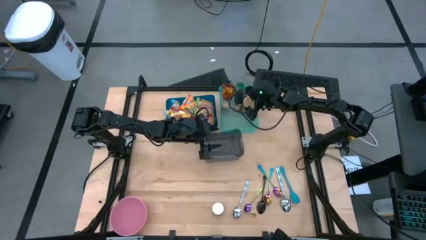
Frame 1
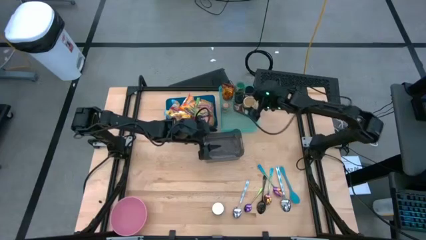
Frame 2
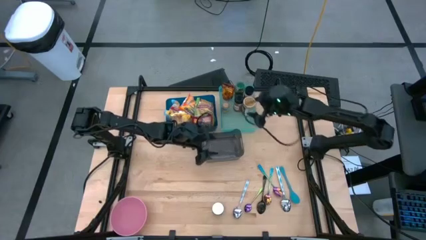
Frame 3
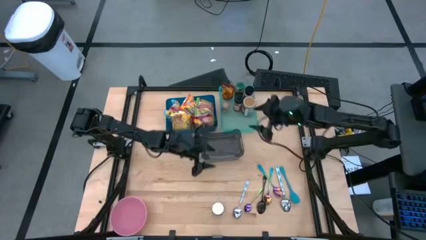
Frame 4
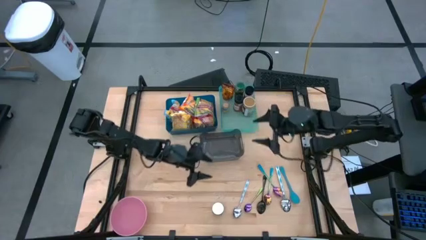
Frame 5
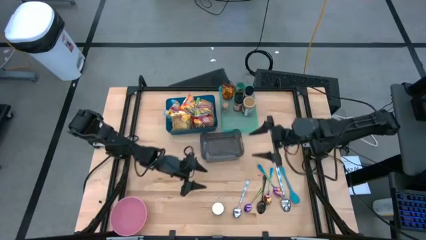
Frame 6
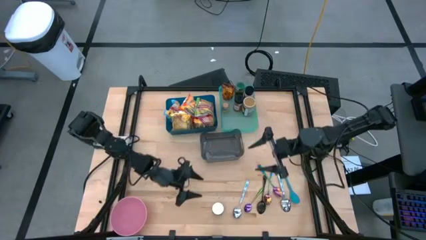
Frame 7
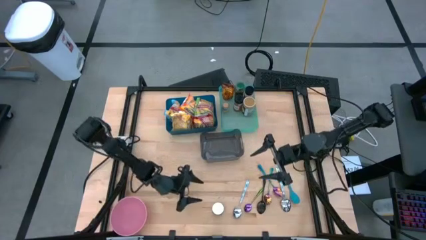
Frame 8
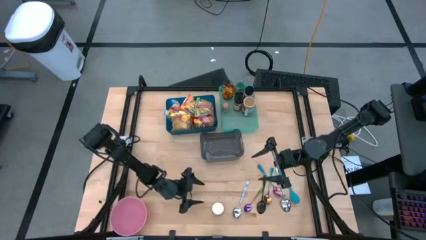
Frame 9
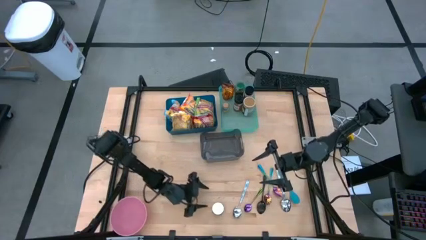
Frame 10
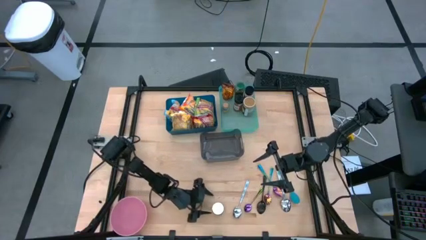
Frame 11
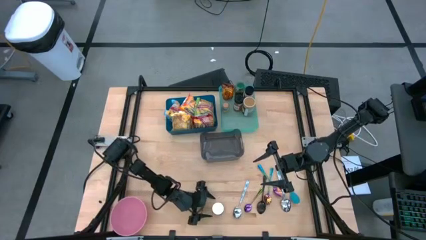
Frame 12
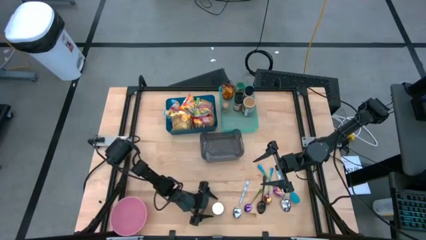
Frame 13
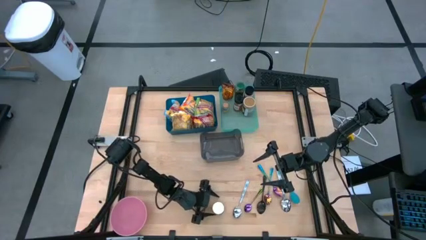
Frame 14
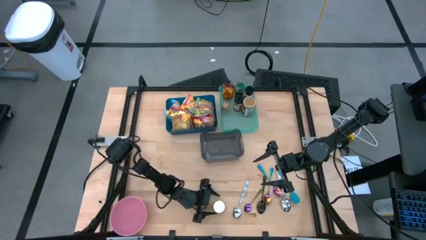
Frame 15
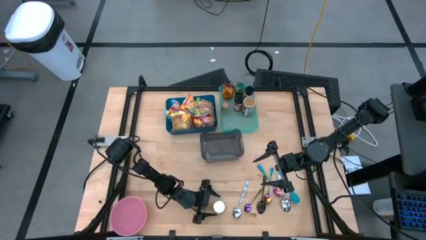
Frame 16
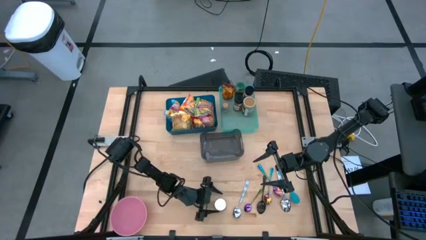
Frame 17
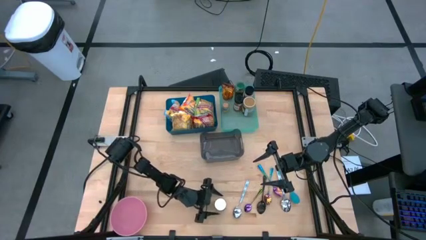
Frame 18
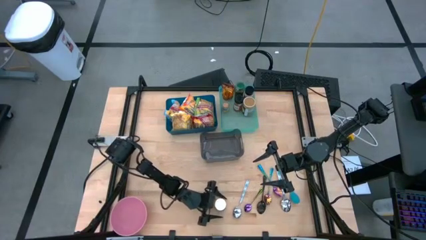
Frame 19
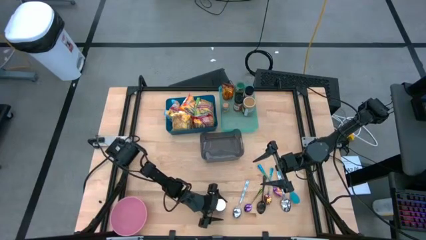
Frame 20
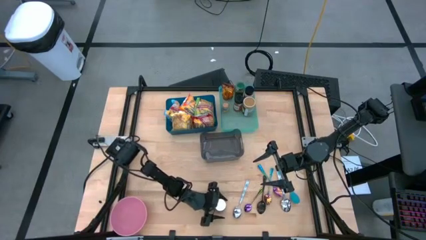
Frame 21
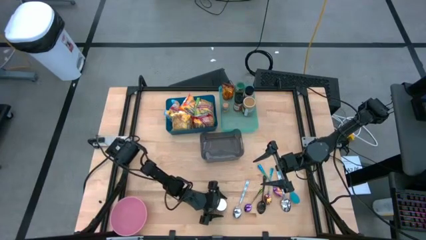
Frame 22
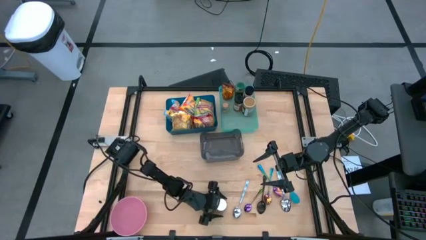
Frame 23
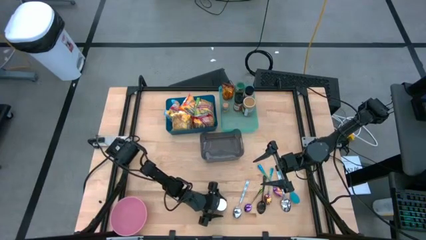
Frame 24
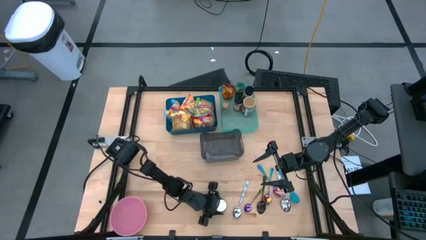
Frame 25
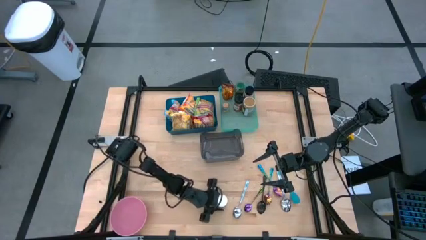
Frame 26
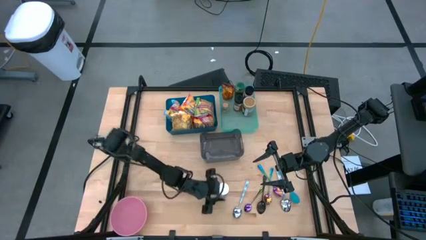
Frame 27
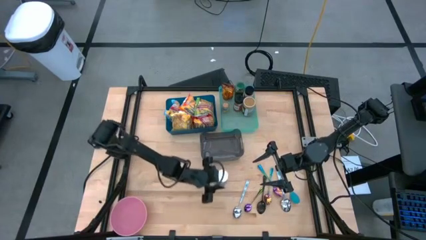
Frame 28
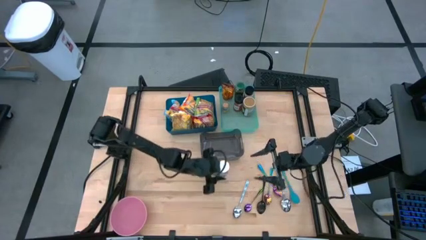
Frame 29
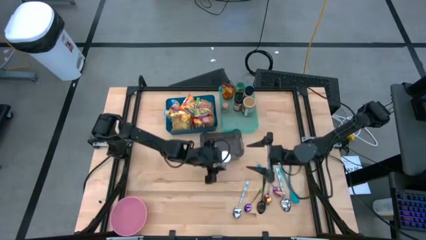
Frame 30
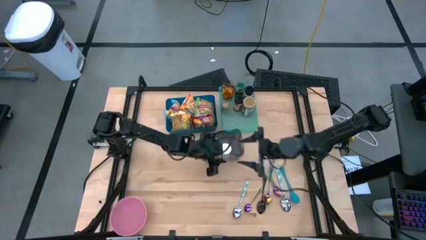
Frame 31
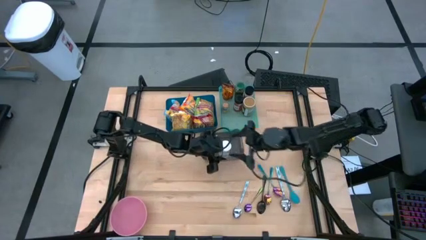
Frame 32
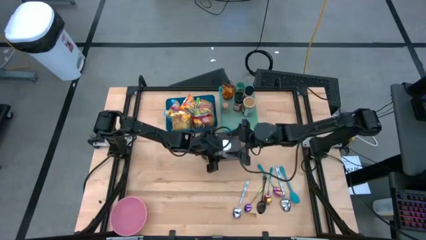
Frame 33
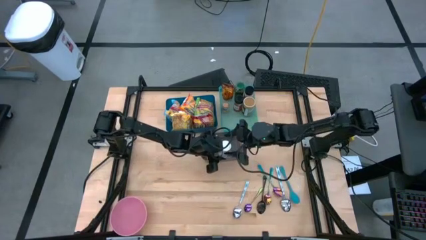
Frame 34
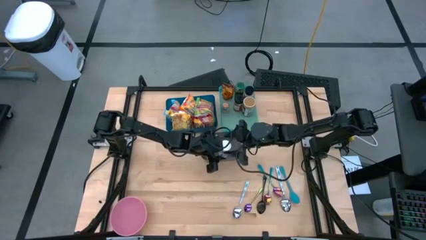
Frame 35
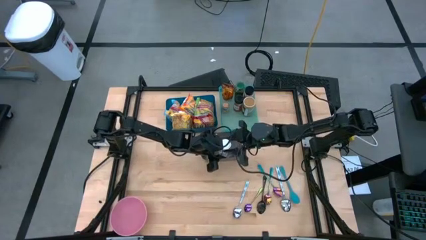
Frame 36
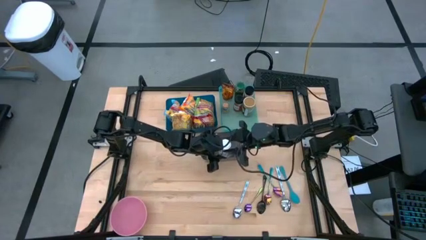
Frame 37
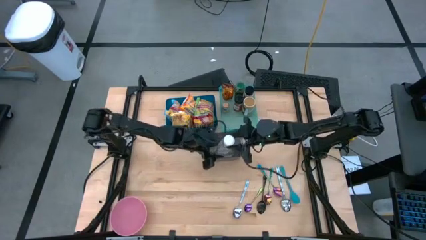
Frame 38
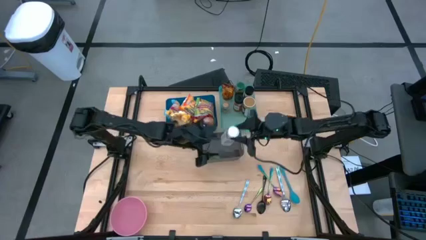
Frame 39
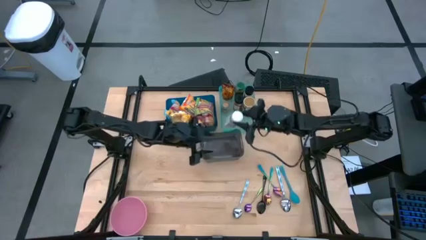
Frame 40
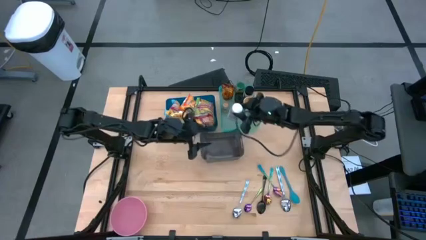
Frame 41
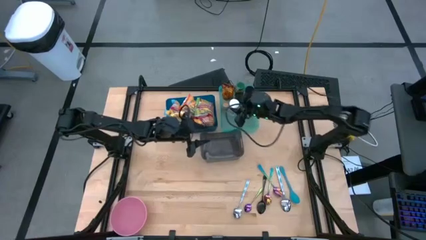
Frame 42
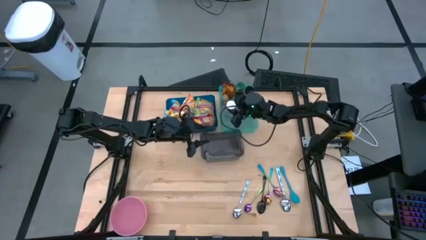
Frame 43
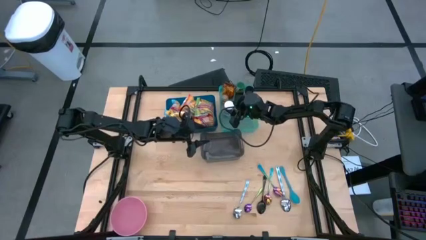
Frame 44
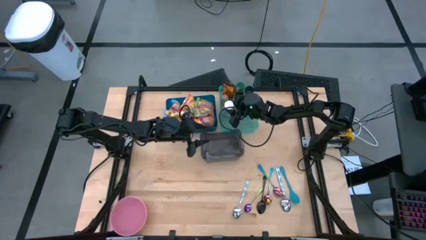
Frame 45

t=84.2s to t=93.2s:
Task: Pick & Place Food Item
Put the white seasoning bottle into the green bin

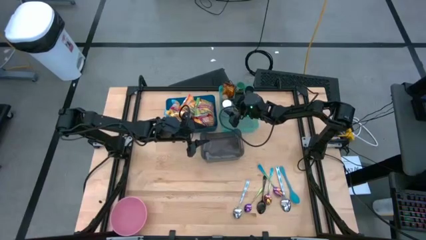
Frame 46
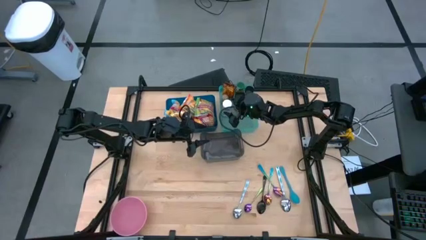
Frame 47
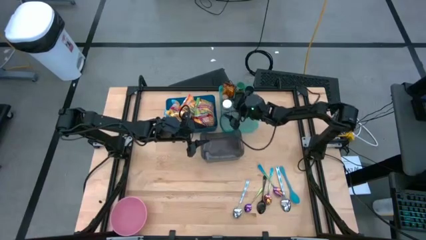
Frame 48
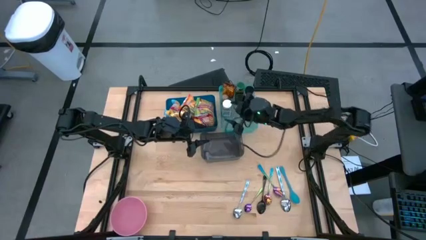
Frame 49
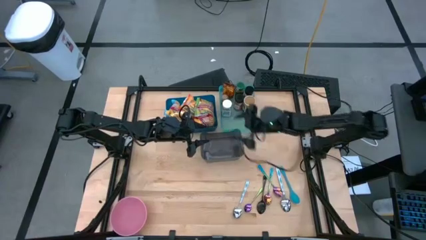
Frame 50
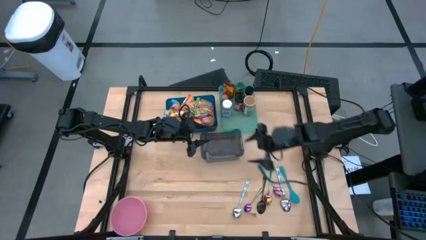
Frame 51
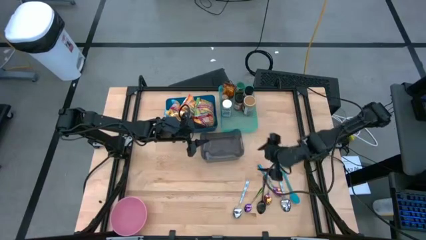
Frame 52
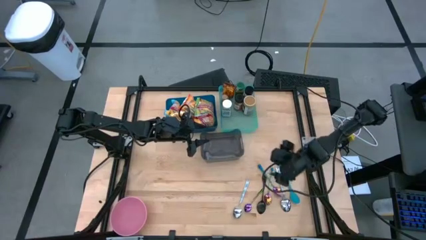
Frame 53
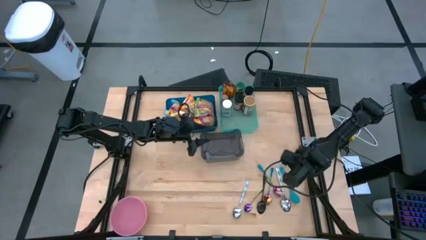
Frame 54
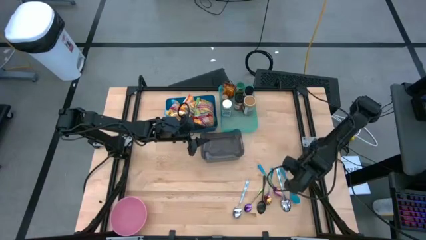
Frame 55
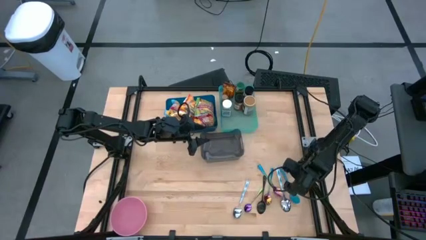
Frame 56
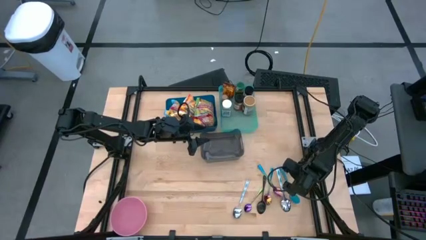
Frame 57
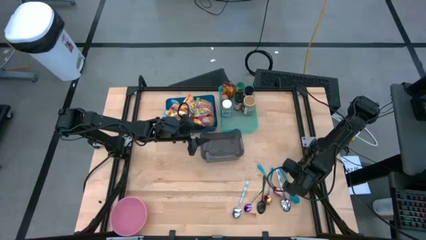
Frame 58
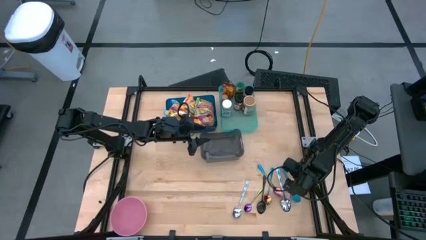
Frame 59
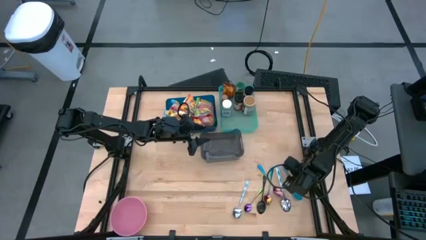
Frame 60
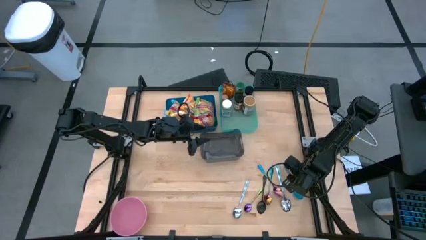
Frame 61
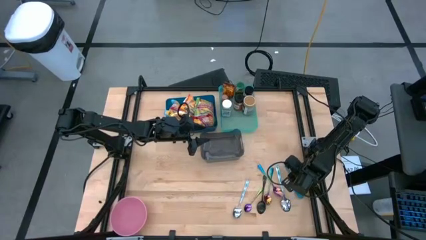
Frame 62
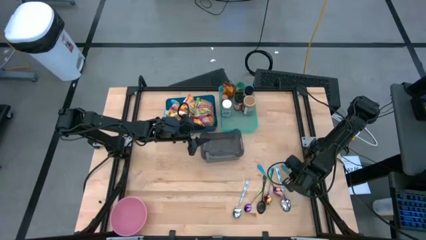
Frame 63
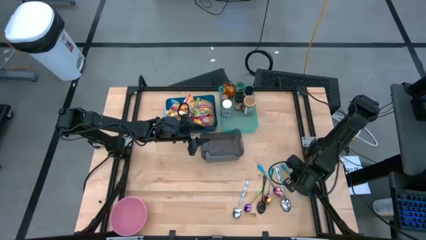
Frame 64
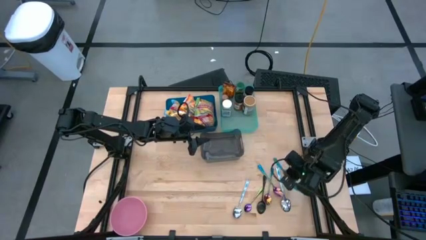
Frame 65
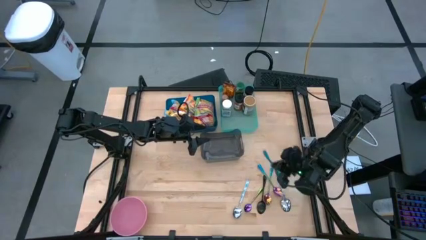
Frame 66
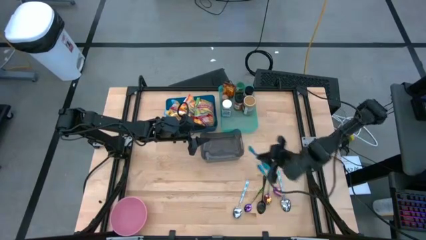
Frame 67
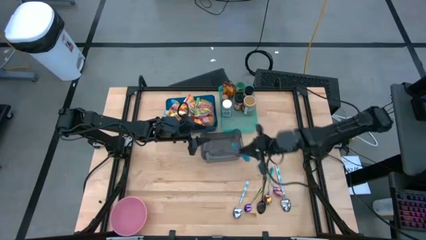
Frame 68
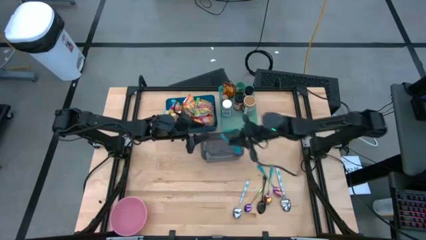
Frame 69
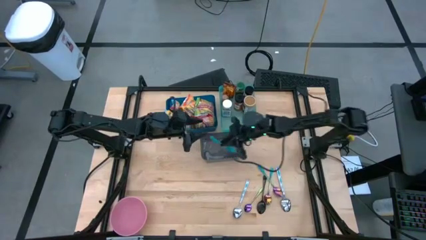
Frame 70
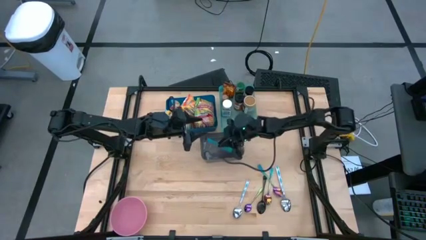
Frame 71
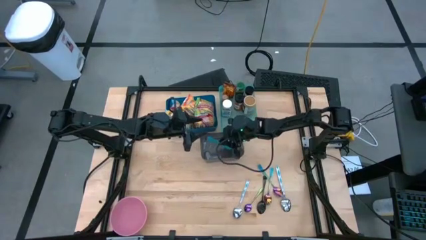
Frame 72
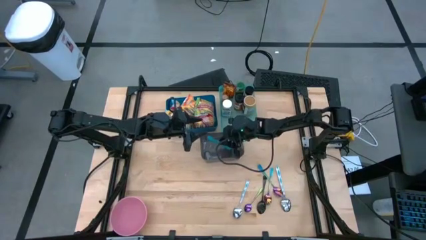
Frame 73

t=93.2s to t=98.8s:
Put the blue baby spoon into the black bin

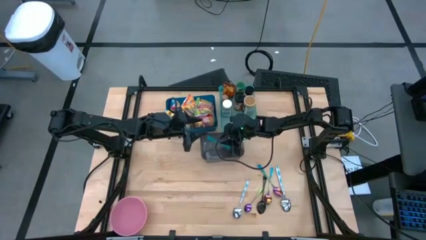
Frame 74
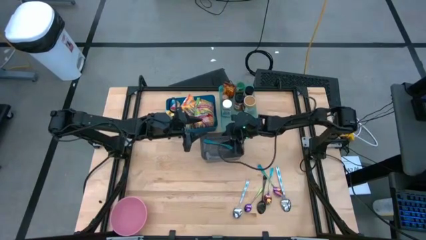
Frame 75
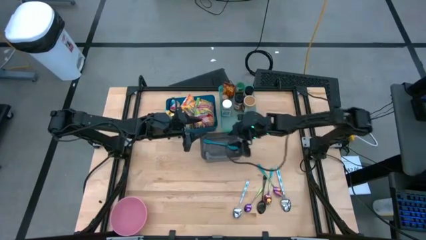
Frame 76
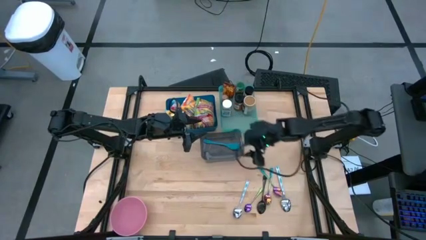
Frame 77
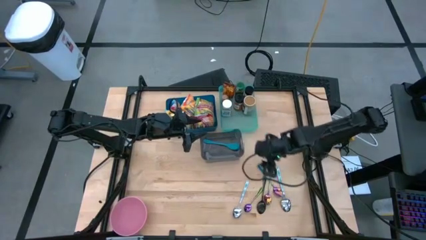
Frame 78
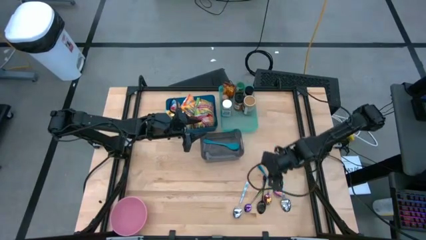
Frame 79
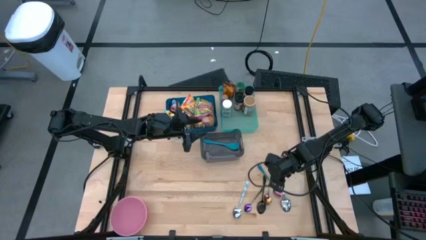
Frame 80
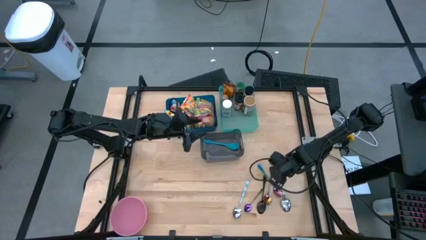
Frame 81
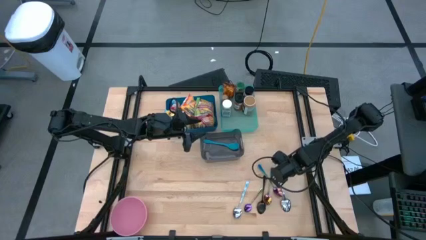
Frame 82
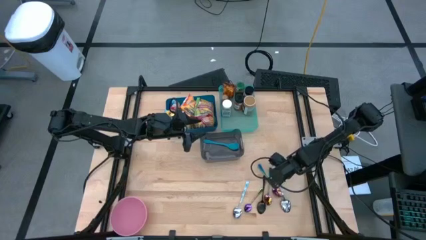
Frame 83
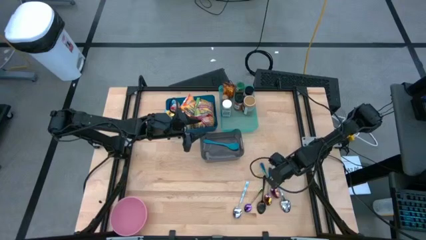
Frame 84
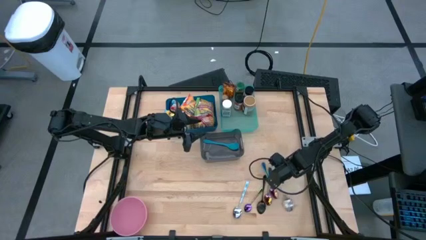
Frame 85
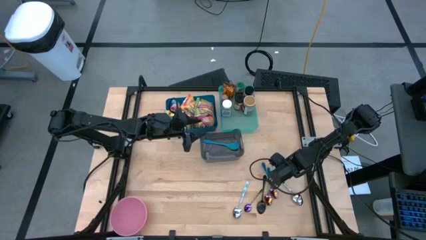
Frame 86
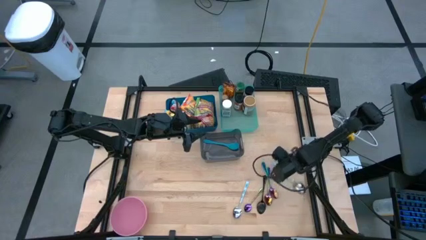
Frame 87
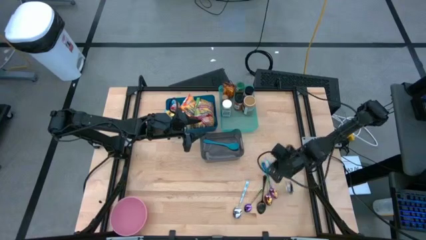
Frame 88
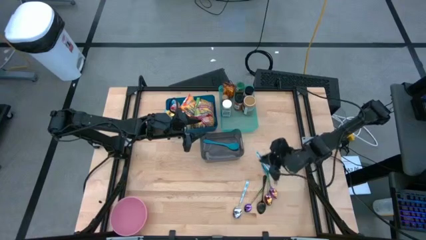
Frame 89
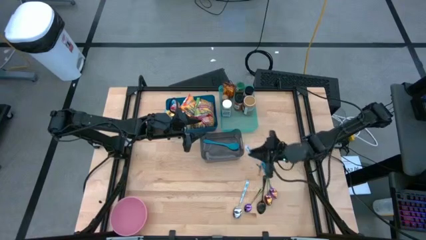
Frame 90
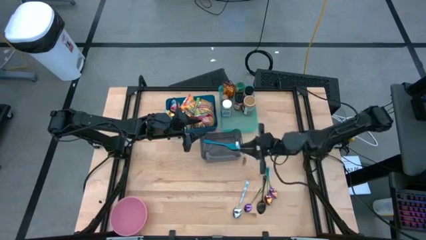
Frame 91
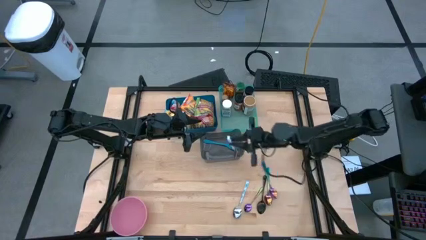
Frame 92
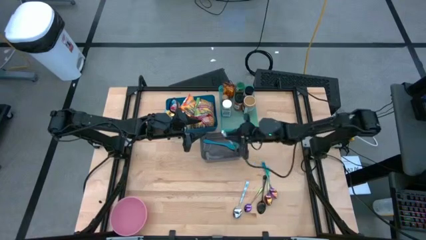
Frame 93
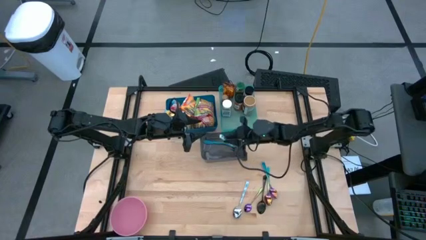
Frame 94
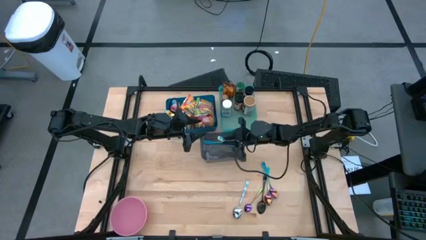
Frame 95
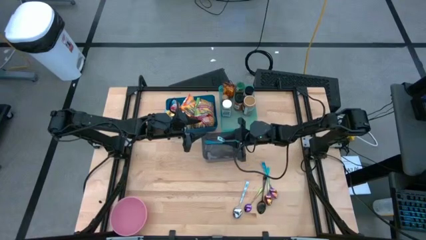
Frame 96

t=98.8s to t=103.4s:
Put the blue patterned spoon into the black bin
